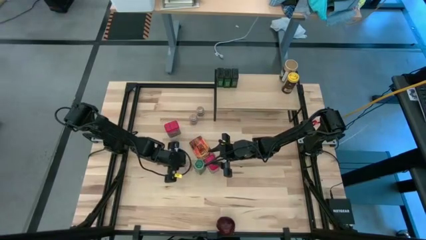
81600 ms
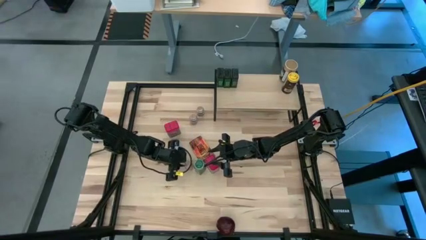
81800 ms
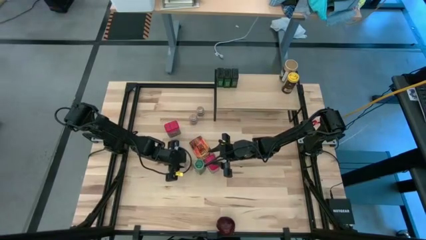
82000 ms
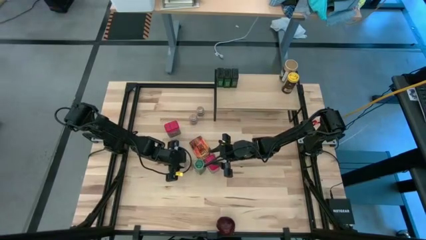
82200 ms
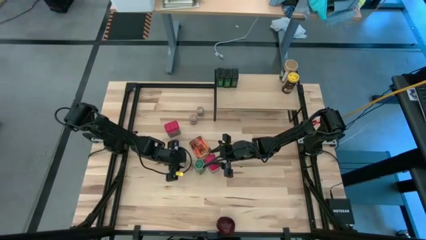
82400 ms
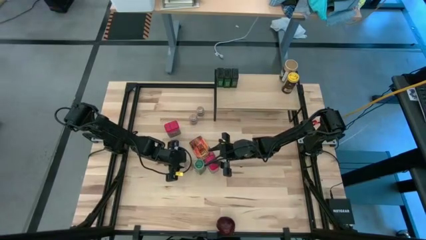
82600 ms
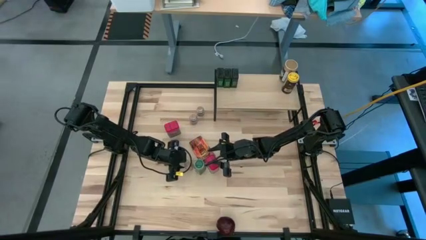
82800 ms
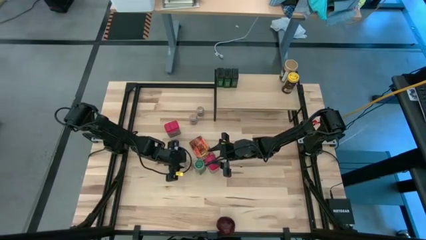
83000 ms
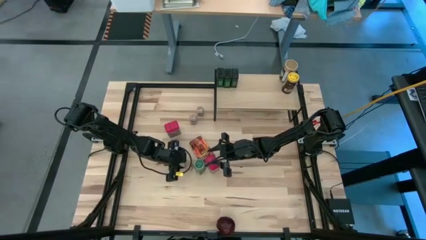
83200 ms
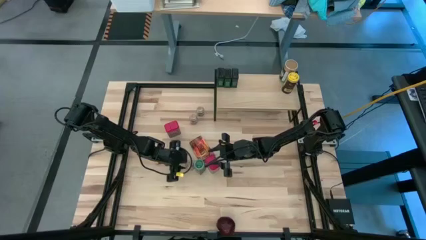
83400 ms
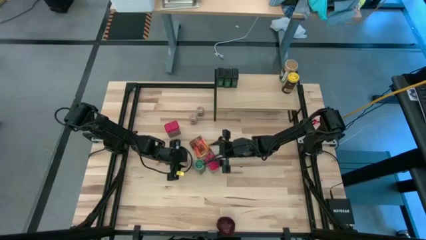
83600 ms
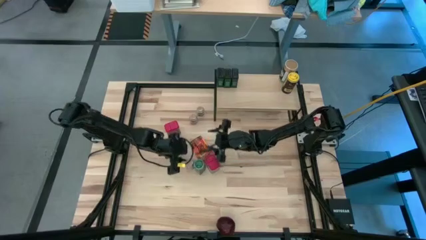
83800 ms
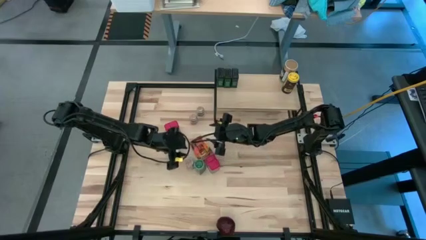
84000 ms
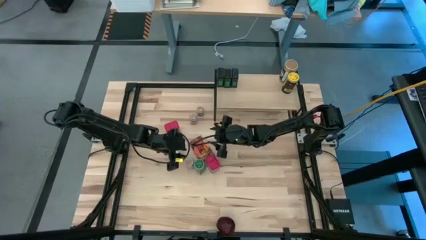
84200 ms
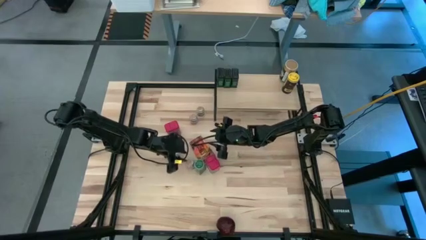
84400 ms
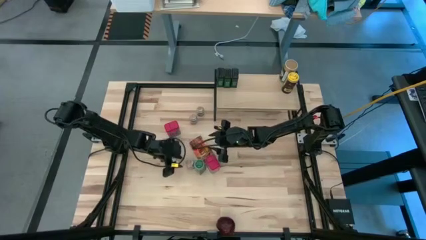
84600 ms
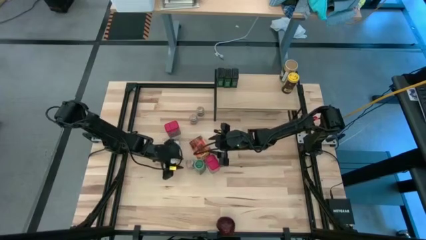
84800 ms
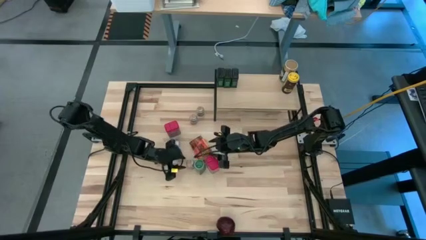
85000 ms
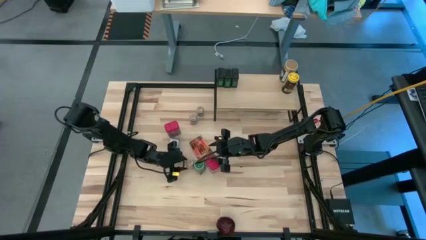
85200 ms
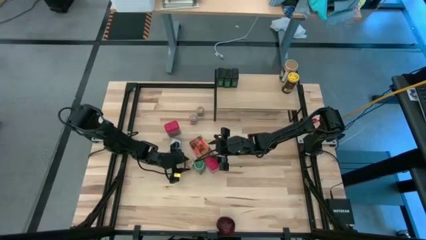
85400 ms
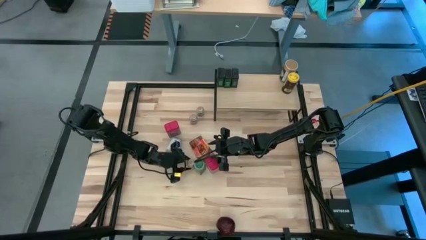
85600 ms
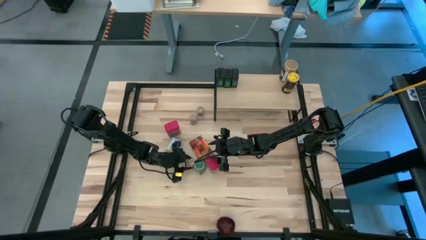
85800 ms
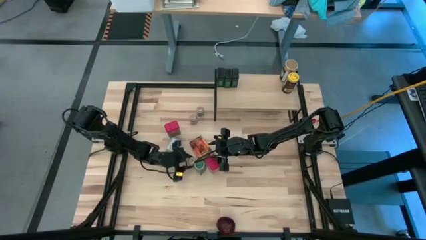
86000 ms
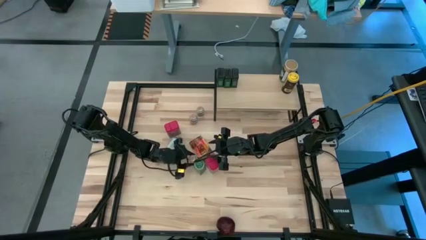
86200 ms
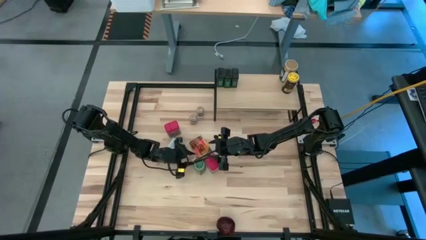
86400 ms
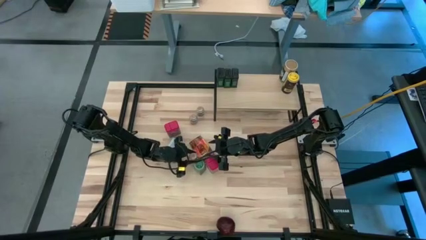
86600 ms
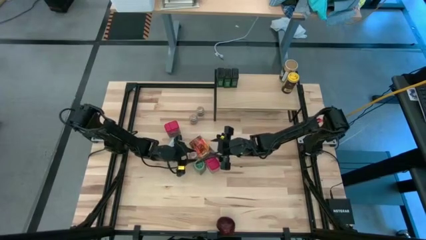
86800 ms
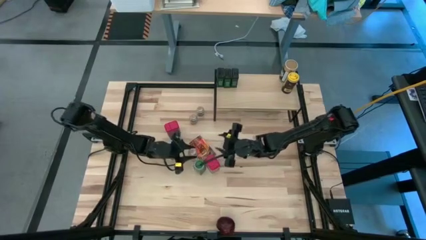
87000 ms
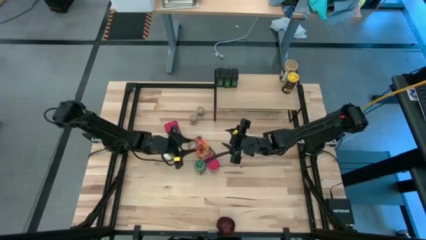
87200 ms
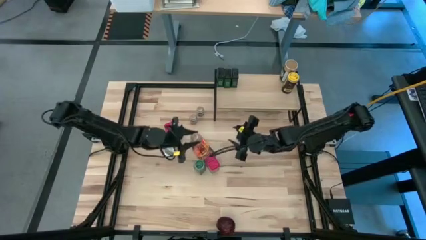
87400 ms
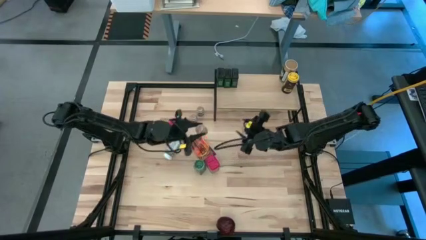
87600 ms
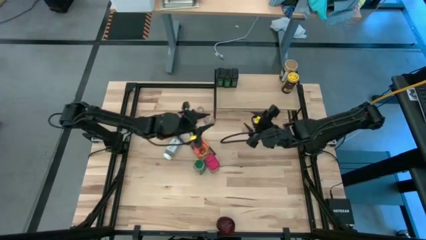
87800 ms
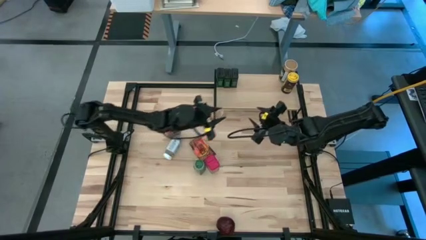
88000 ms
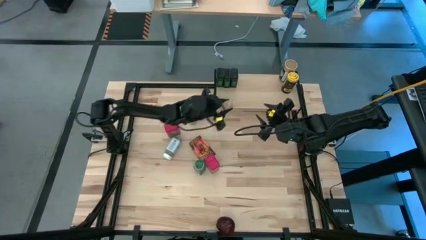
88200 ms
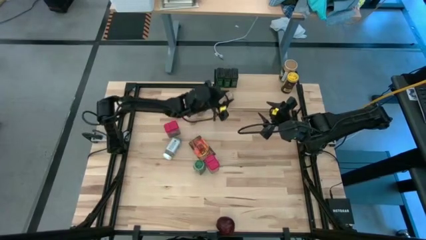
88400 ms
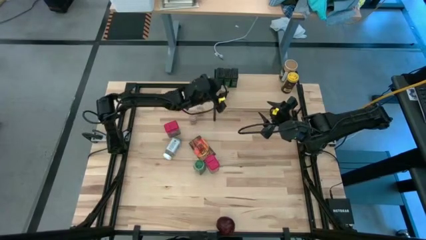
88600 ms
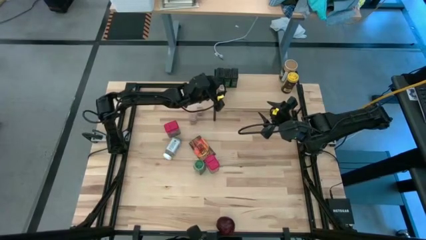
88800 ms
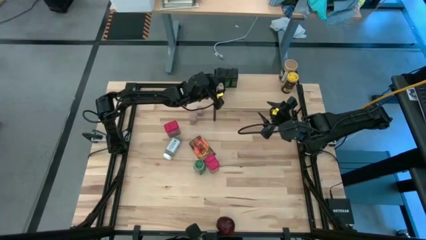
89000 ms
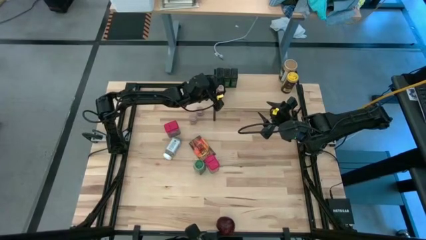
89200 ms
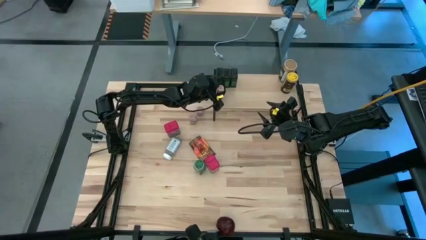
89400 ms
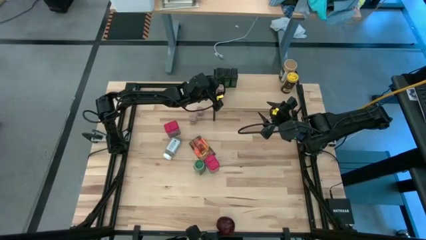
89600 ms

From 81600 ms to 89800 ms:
Task: Shelf spices
Put the bottom transparent seasoning bottle on the shelf

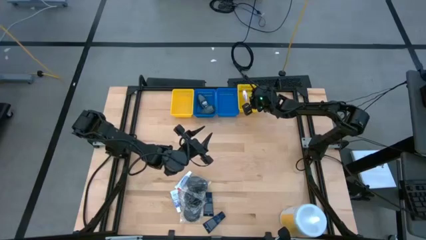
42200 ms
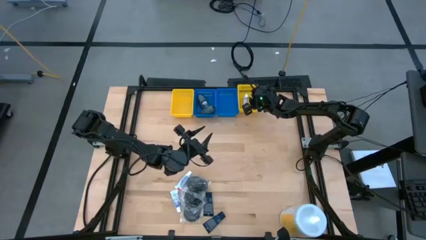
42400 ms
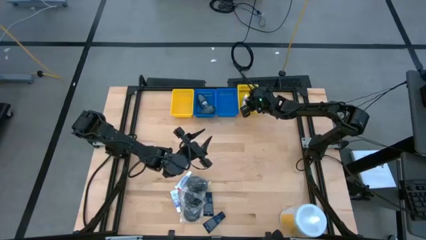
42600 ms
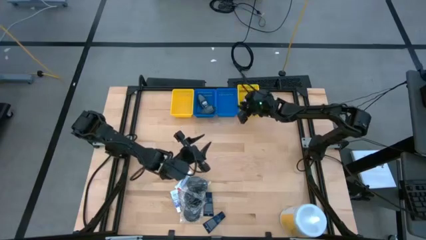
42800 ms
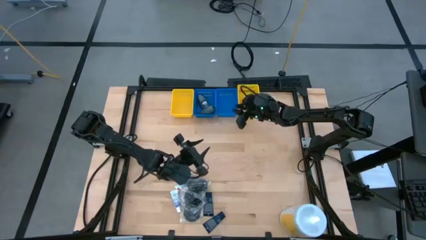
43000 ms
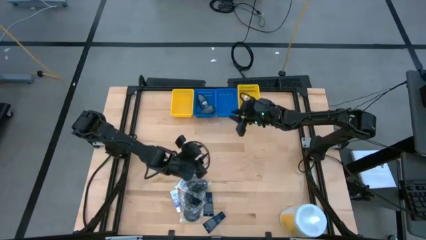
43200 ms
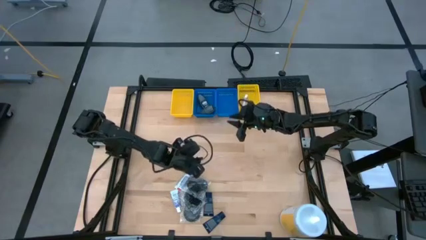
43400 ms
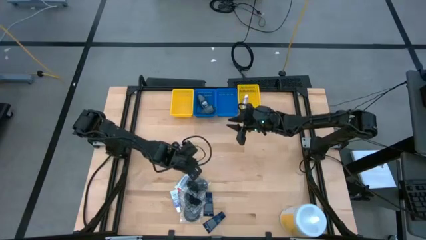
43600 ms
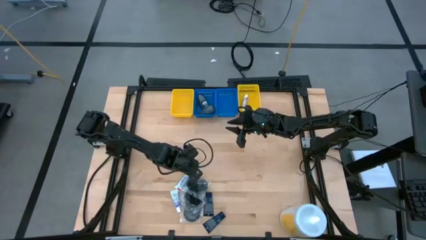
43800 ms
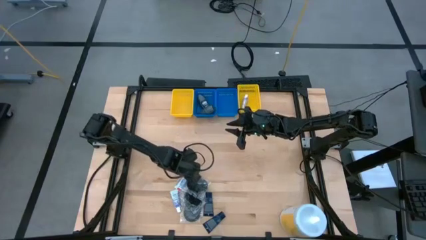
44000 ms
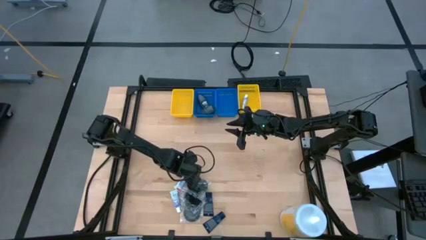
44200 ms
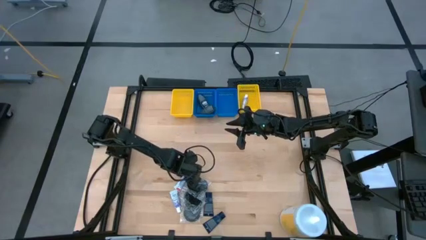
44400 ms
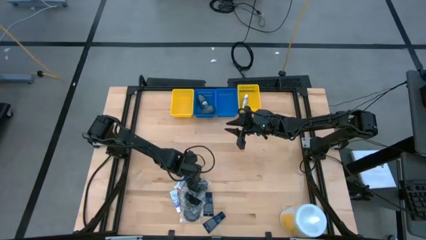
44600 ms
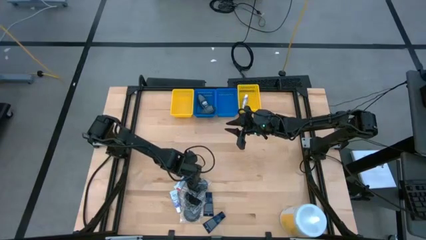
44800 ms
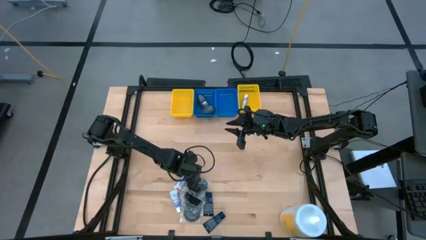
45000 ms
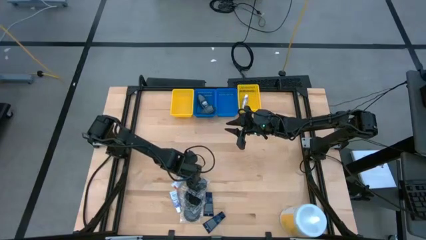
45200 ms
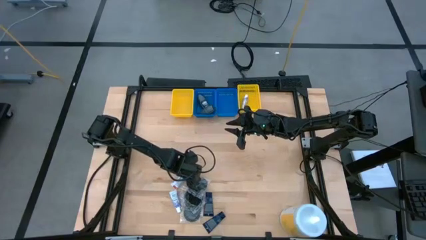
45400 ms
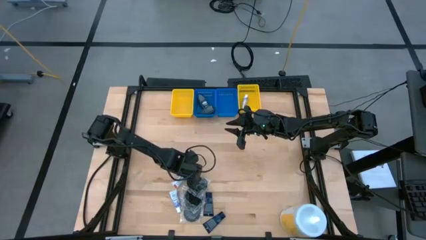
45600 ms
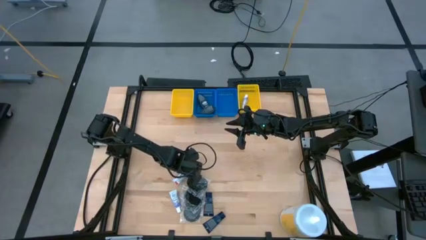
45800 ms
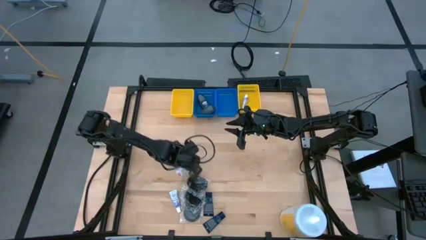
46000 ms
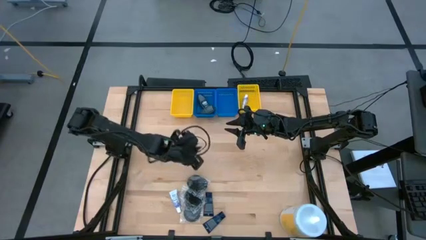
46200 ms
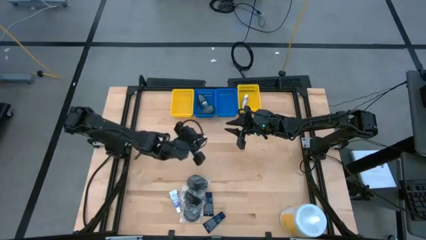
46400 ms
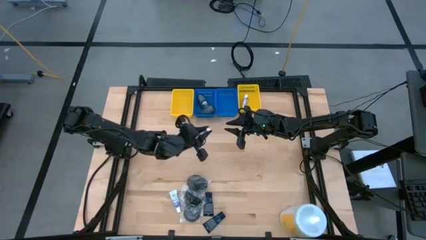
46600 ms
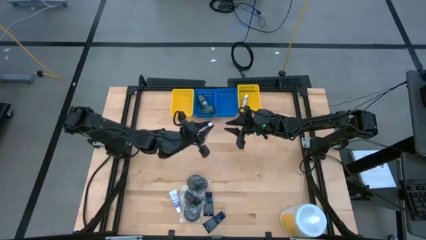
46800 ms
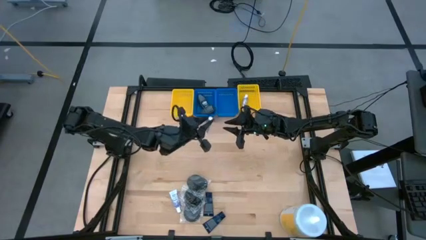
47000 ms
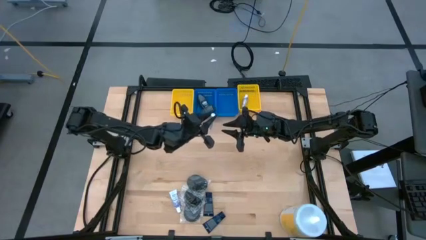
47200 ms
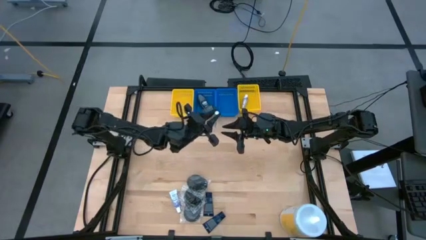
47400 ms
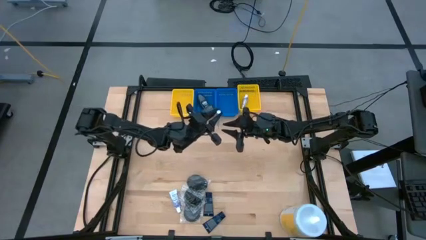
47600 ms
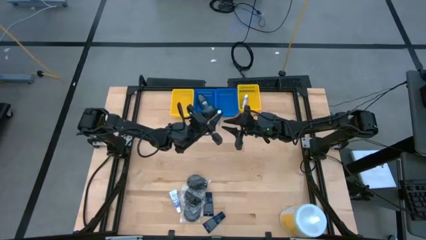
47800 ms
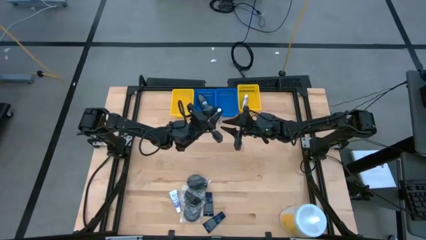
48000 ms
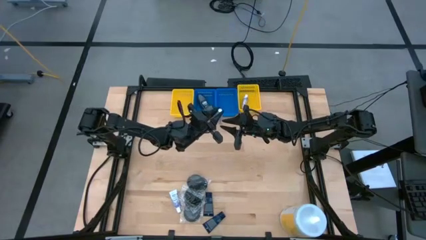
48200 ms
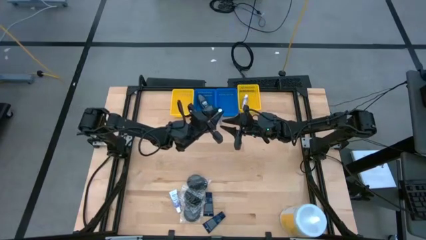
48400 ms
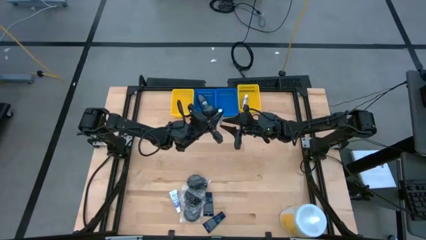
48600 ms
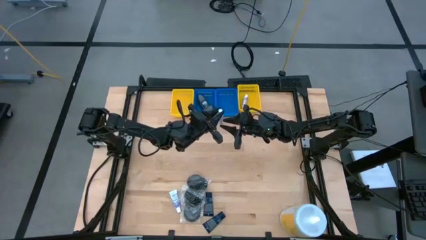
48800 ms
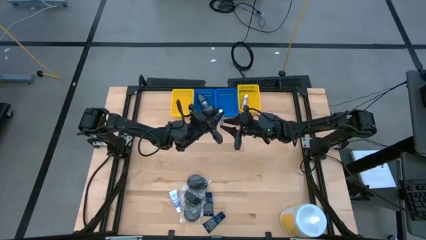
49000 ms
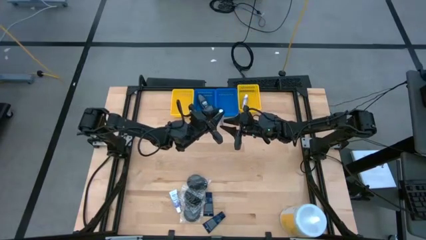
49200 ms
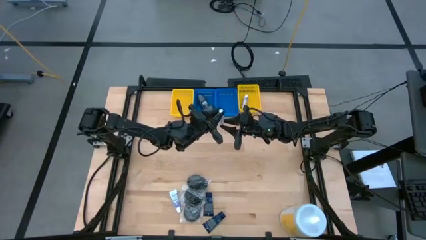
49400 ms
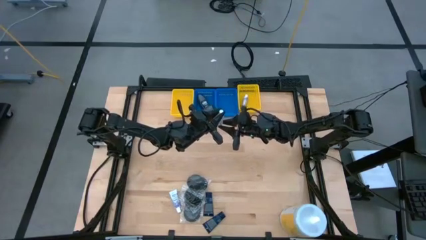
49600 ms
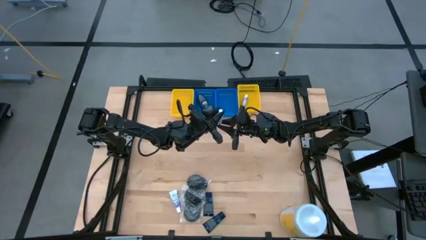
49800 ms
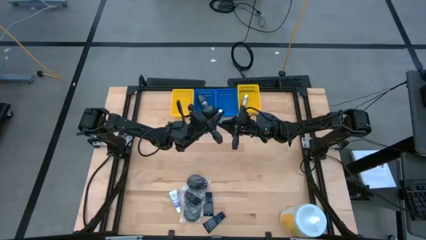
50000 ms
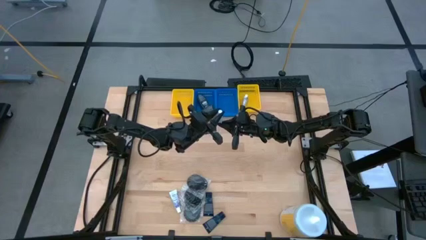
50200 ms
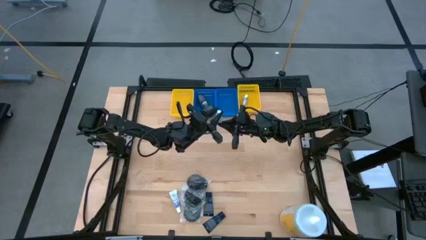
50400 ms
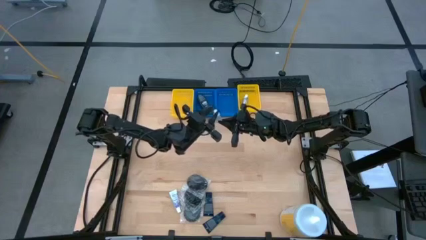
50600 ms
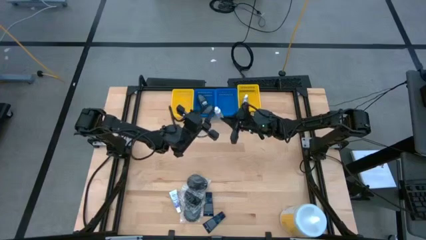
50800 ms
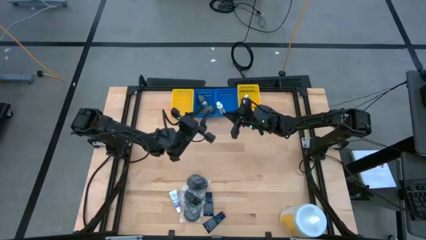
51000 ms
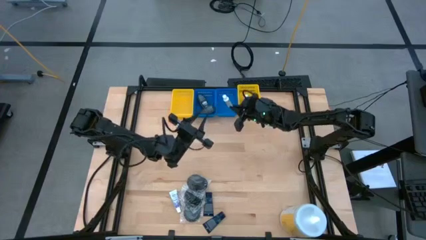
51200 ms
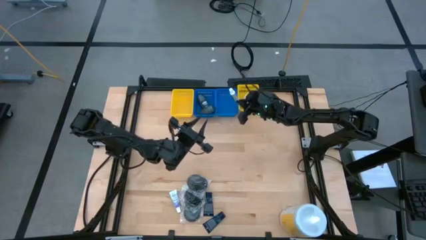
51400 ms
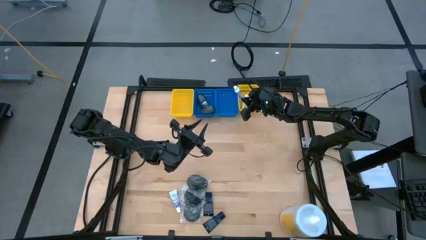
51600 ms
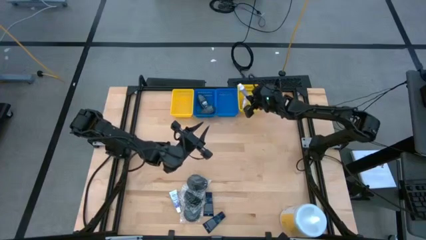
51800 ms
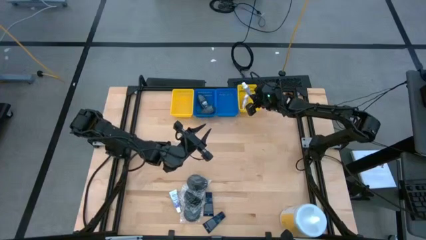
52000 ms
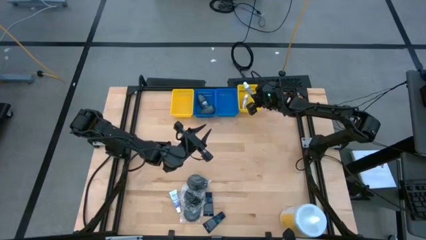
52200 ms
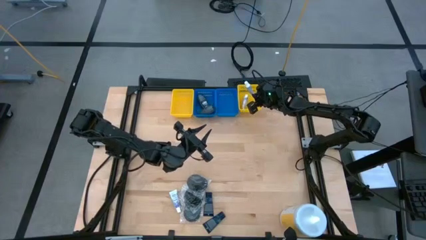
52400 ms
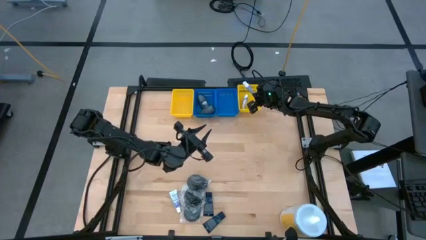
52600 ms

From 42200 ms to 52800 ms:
Task: Pick & Place Travel size toiletries
Put the white toothpaste into the right yellow bin
